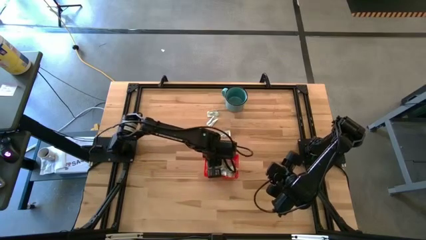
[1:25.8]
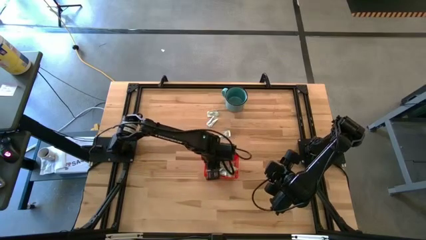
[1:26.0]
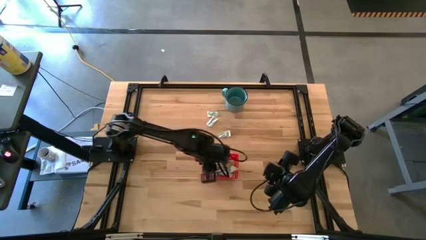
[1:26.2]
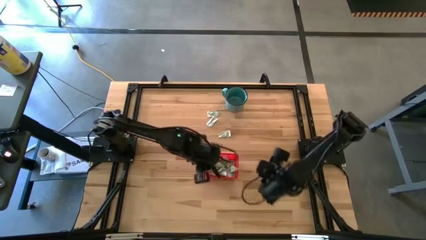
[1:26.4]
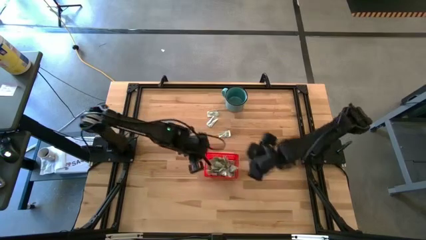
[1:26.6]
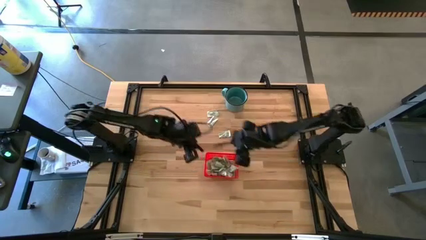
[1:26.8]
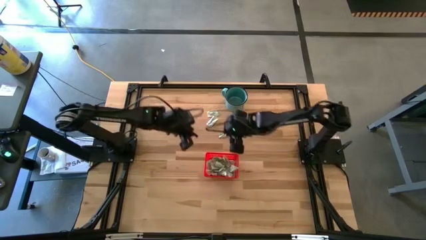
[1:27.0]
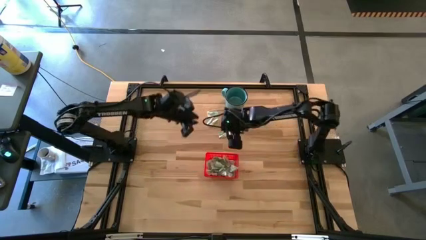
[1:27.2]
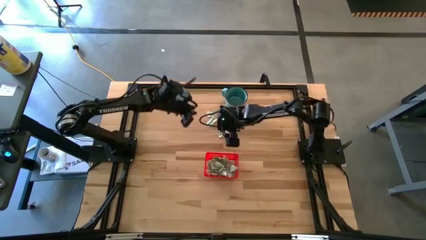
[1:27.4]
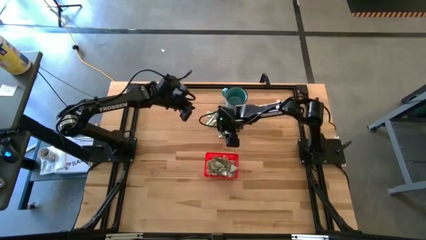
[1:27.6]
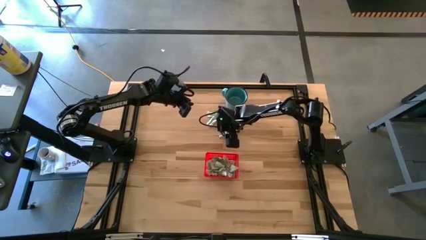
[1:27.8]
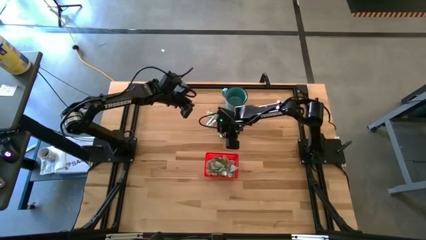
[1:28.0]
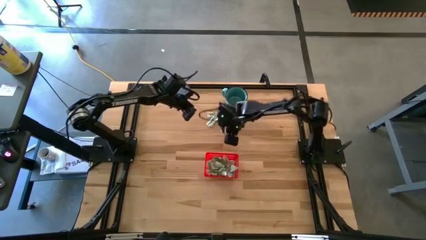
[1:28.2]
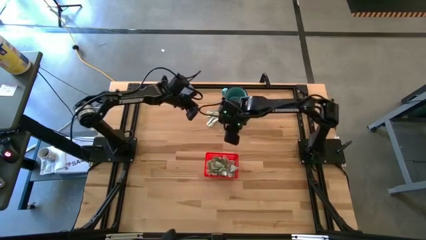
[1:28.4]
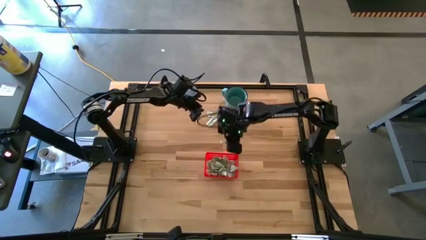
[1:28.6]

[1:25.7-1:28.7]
Task: Pick and place Stevia / Truvia into bins
Put the green stevia packet into the red bin

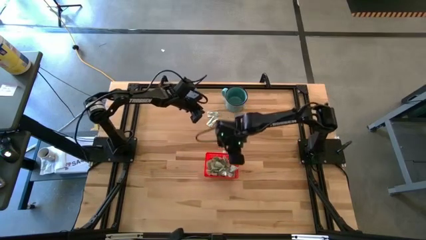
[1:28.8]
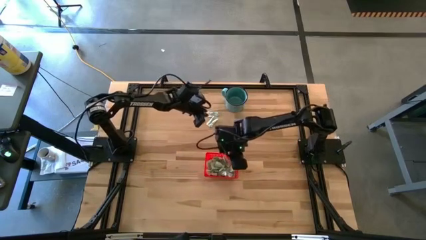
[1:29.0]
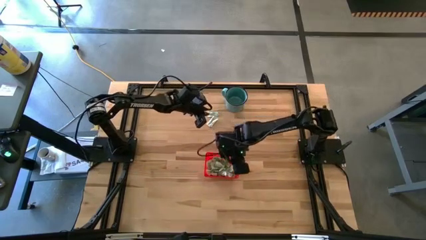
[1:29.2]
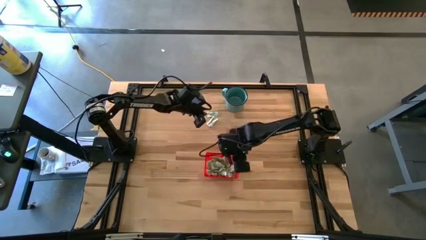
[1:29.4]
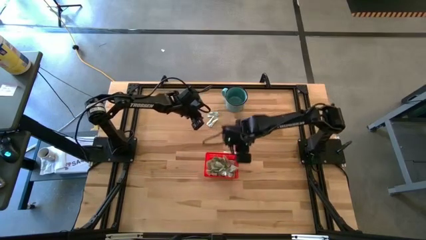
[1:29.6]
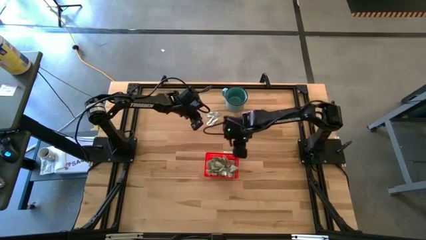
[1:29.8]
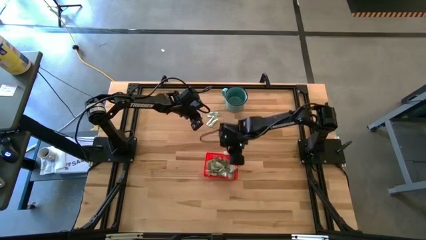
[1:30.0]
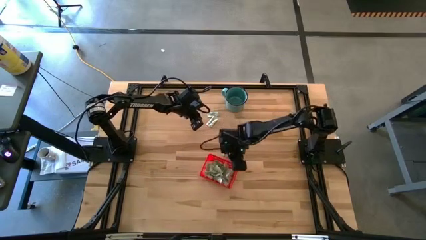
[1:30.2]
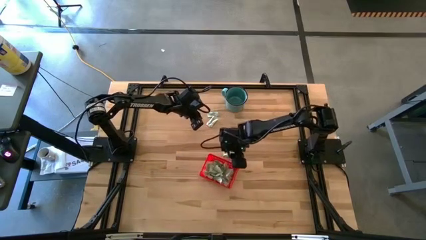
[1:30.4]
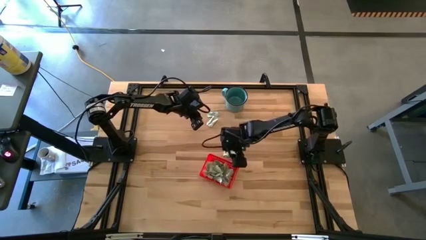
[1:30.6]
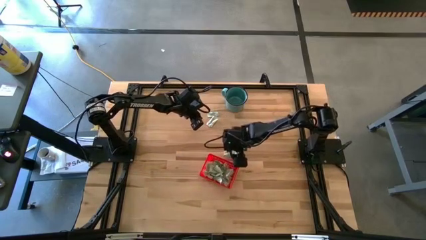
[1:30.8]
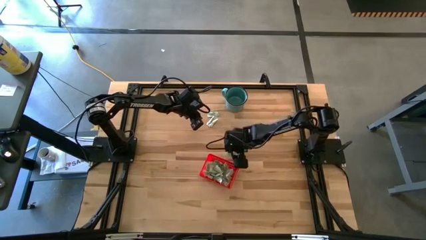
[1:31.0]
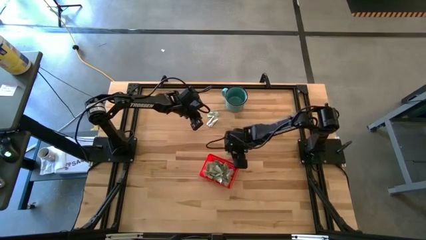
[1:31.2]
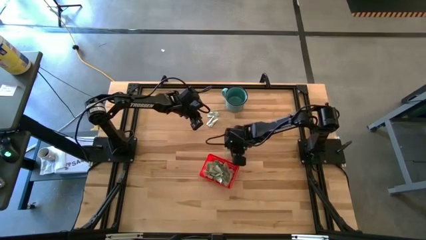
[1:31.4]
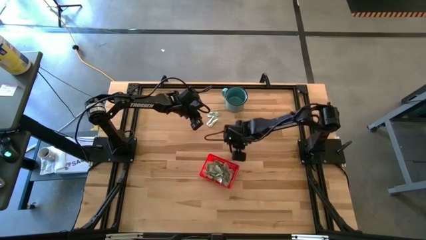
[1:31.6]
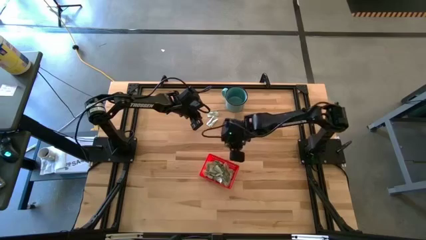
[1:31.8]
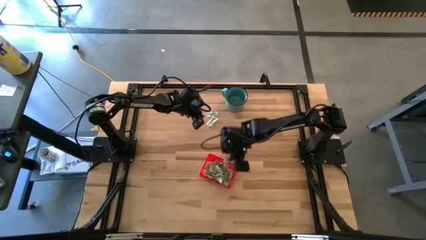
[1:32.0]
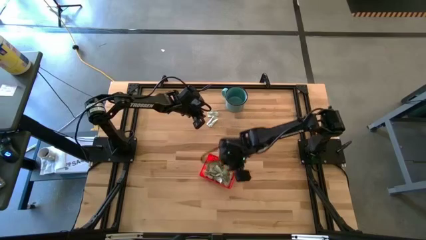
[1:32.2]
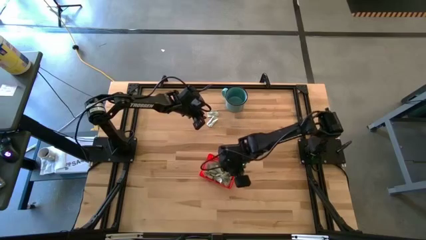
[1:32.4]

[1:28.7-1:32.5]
Put the green stevia packet into the red bin

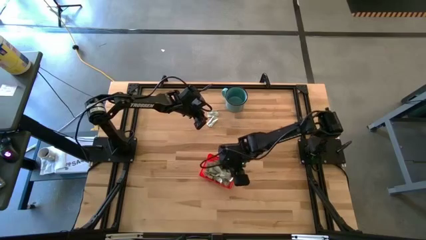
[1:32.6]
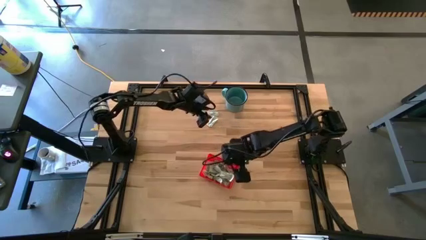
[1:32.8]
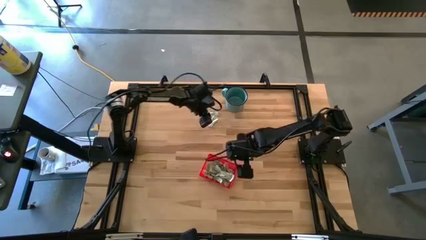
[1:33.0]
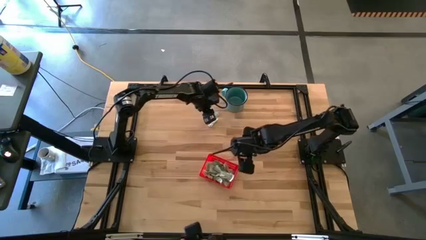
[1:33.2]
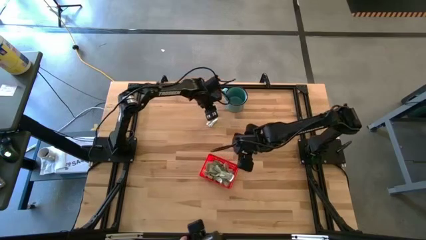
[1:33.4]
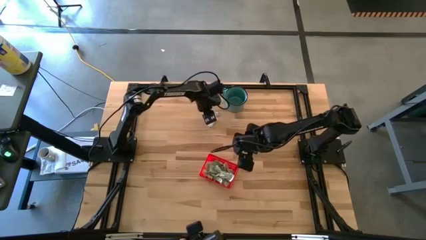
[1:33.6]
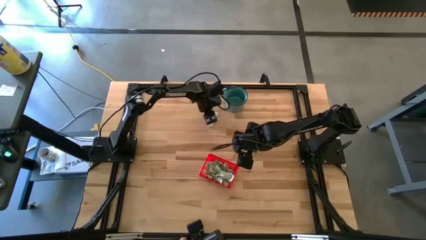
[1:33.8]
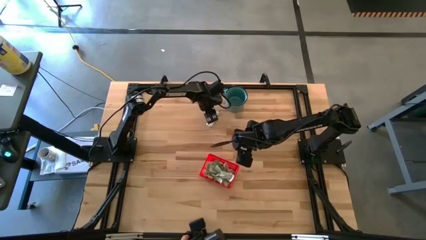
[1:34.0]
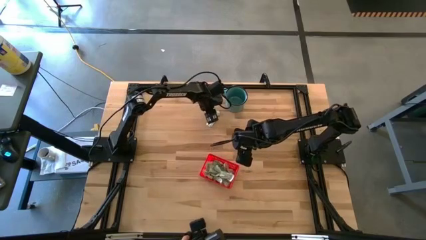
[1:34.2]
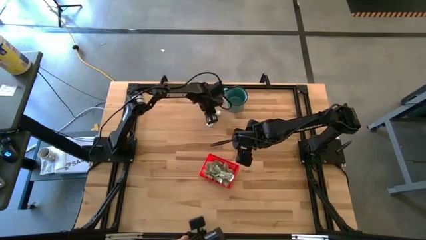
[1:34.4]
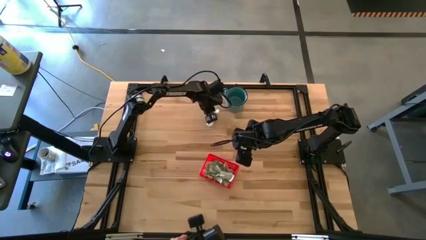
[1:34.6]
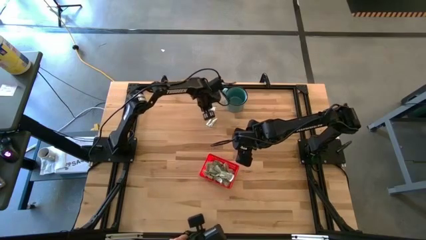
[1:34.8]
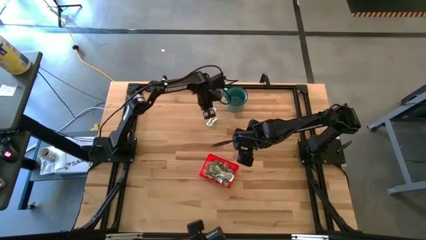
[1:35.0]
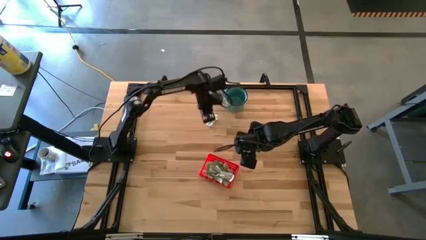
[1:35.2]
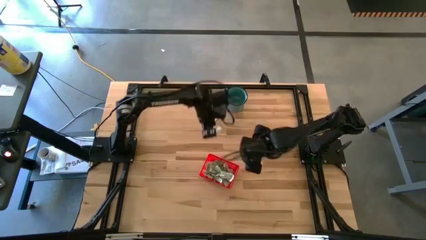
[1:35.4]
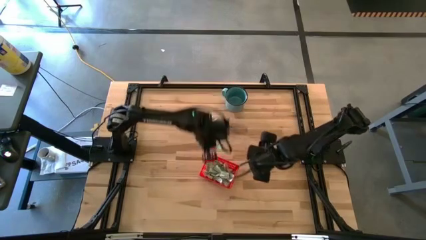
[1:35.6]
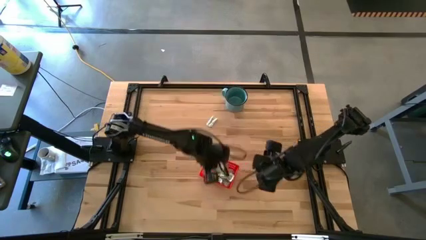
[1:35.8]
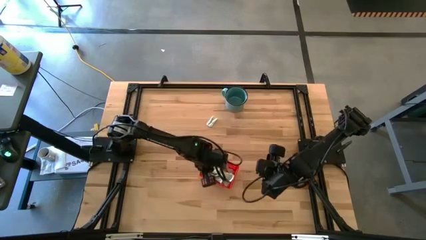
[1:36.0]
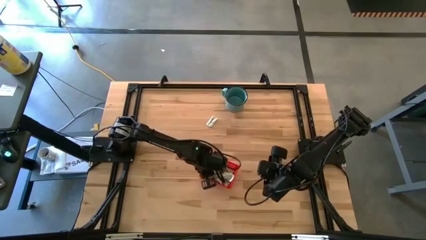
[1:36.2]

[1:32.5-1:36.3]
Put the green stevia packet into the red bin

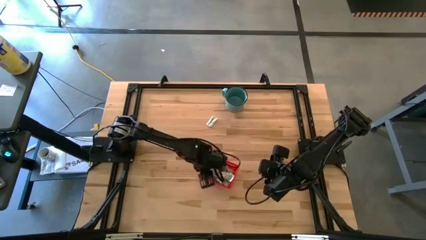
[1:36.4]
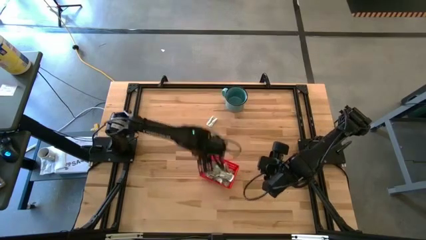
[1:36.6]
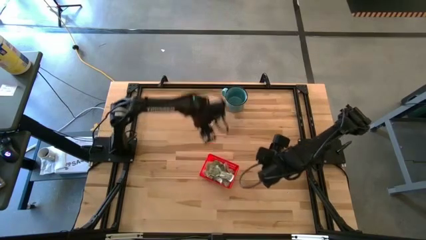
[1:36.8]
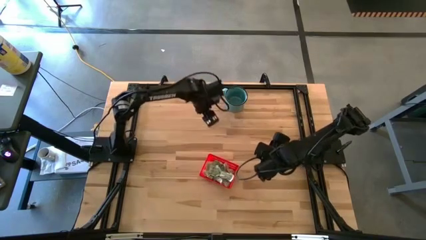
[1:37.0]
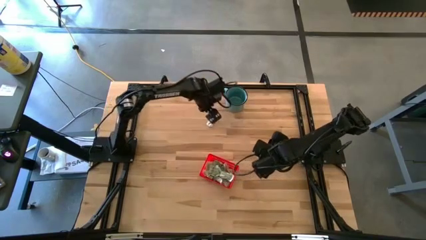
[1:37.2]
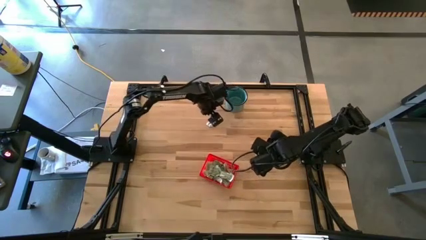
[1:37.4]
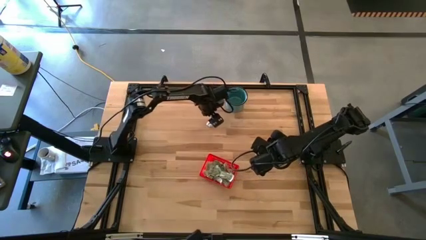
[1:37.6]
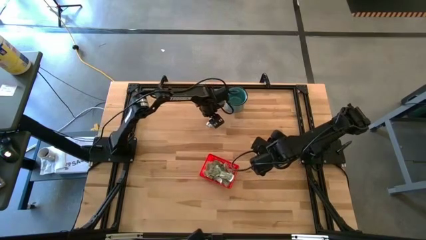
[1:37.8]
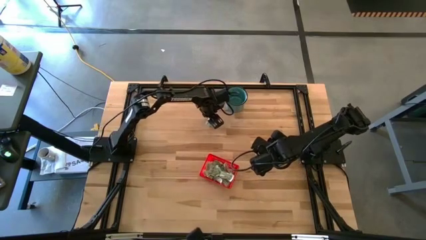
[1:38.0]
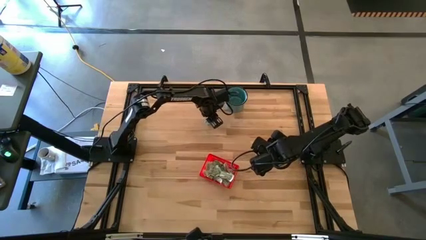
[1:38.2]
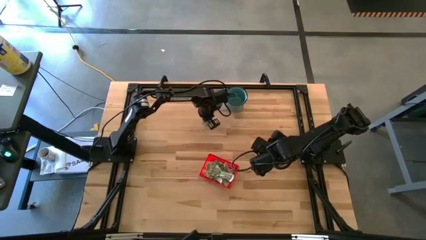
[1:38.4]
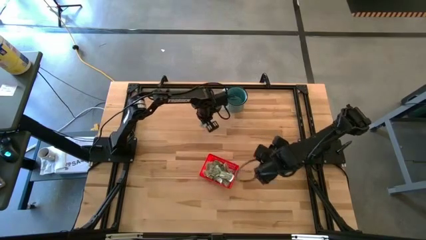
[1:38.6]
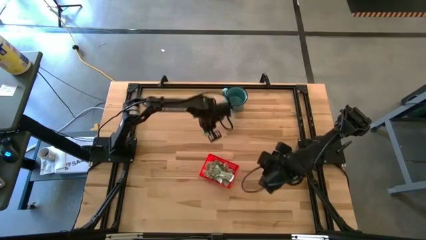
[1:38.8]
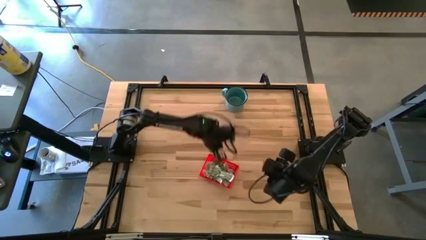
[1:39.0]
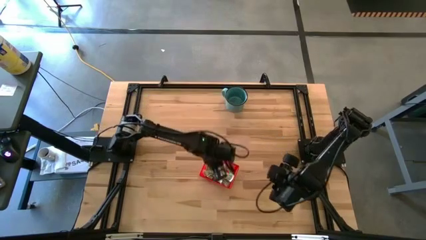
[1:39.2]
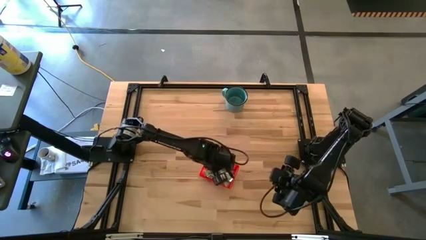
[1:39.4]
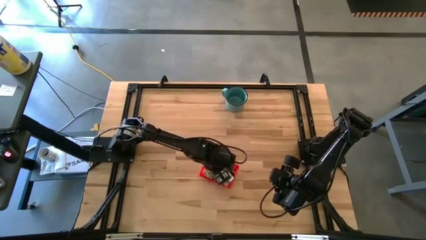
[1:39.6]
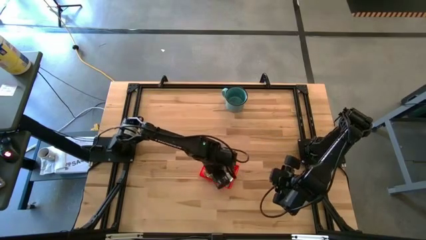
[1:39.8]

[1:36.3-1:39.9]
Put the green stevia packet into the red bin

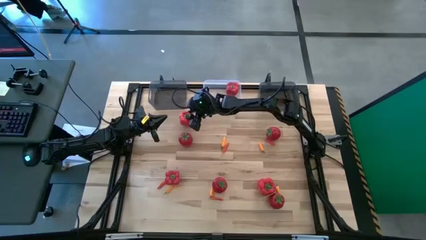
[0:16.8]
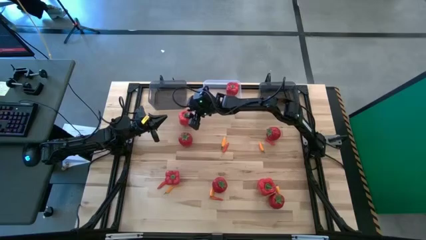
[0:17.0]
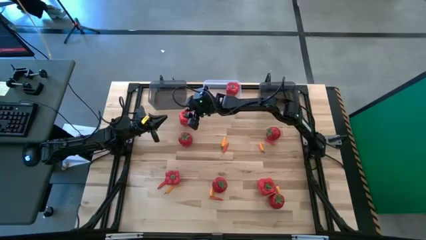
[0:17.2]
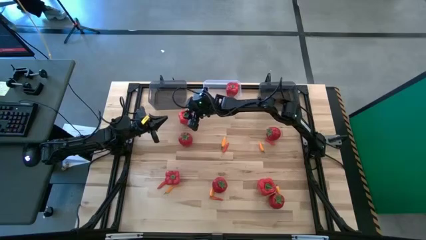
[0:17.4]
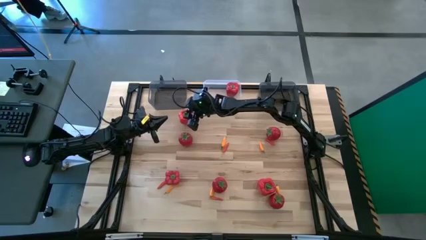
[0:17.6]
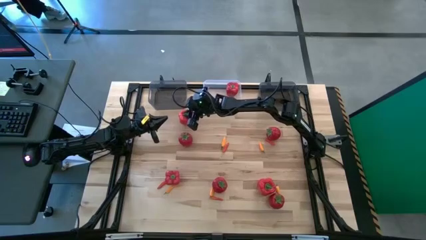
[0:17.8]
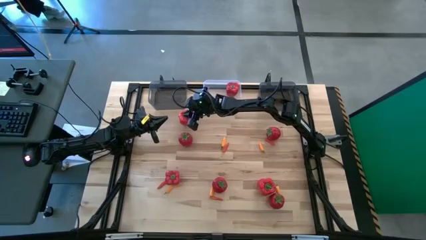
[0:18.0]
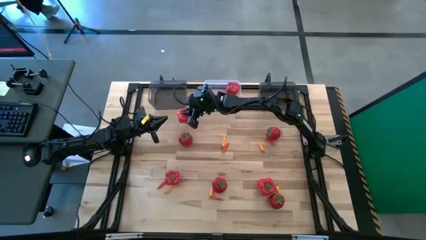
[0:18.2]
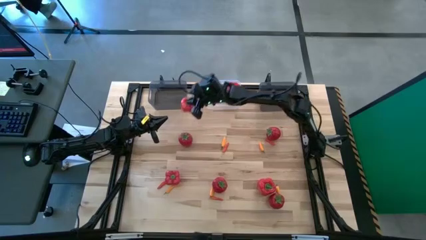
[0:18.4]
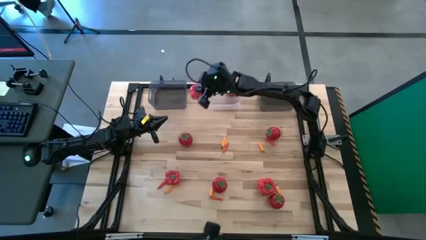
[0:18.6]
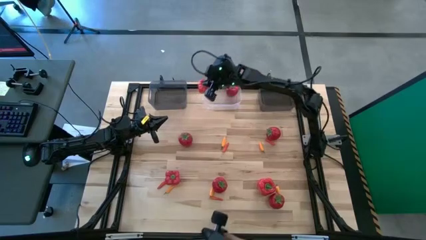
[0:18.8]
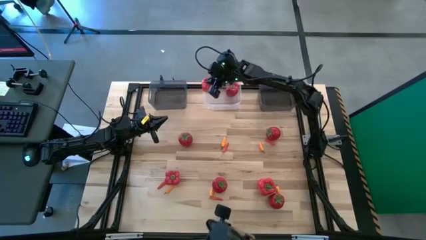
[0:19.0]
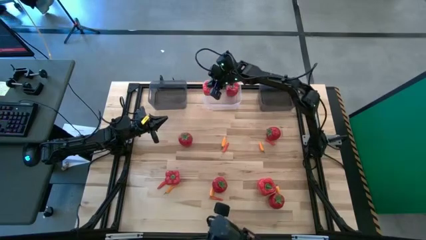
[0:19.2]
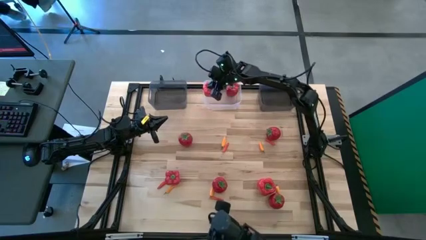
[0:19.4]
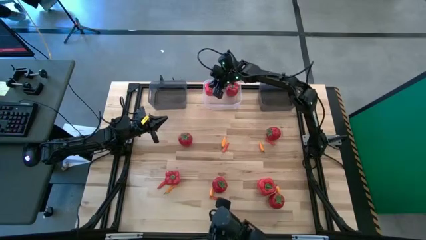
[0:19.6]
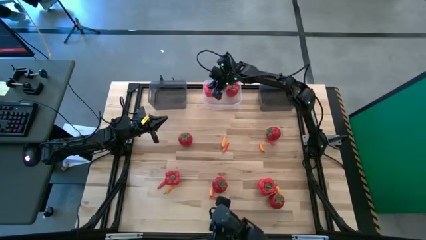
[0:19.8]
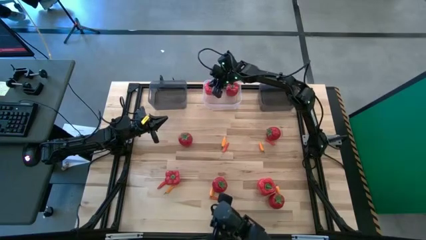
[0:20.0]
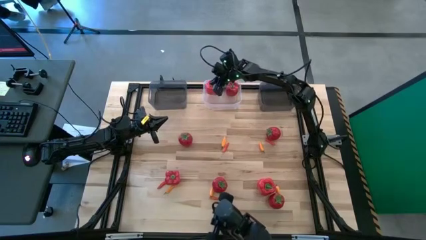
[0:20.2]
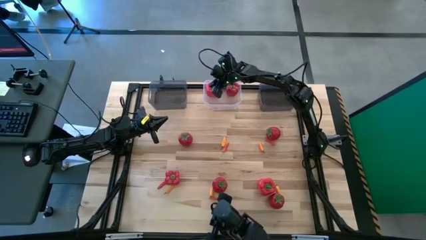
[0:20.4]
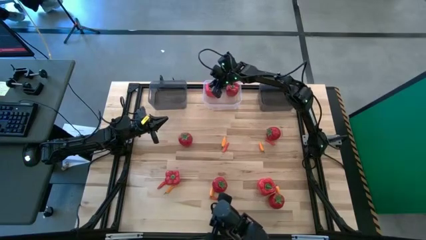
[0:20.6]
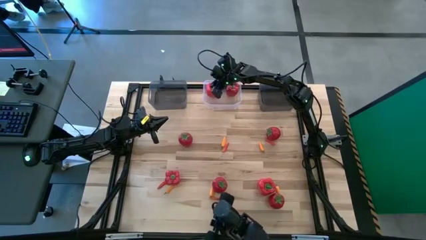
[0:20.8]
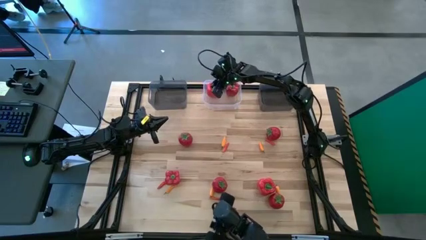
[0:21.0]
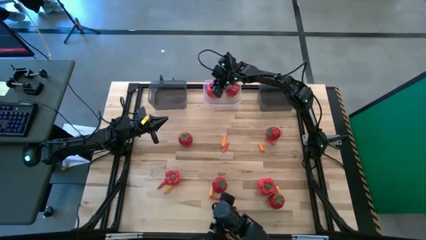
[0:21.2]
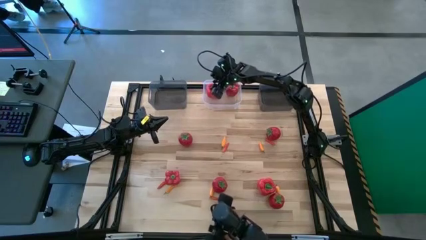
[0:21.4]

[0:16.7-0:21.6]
Task: Sort produce into baskets
Put the red bell pepper into the transparent bin
